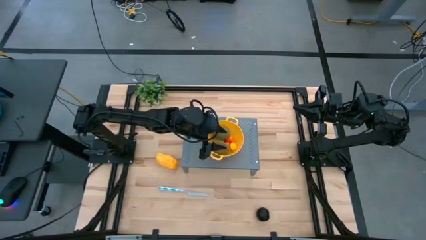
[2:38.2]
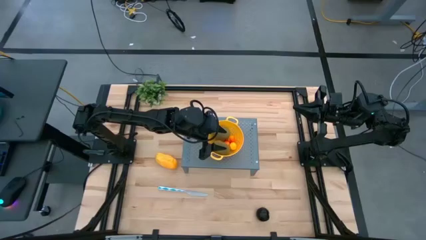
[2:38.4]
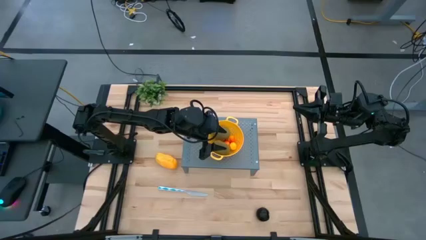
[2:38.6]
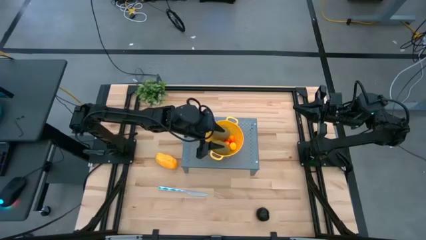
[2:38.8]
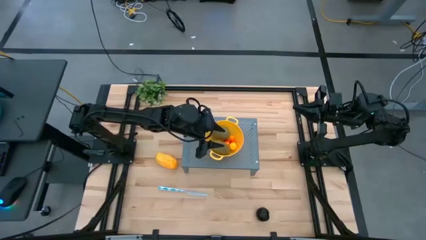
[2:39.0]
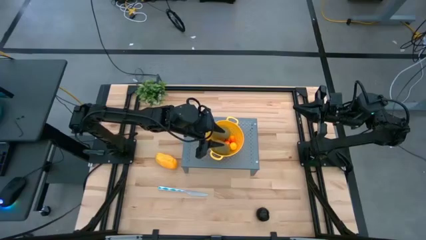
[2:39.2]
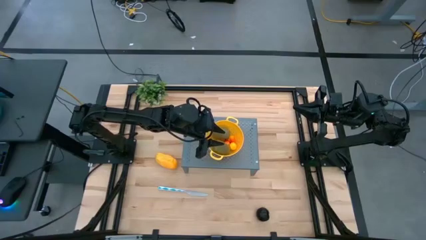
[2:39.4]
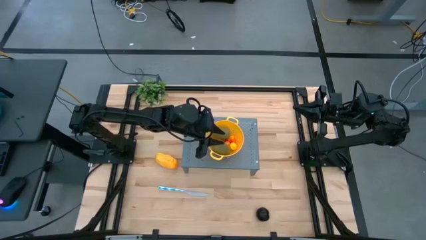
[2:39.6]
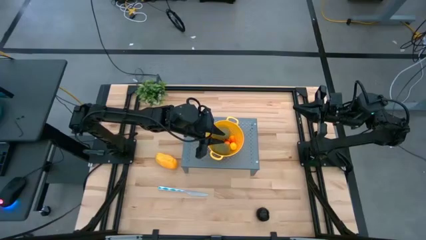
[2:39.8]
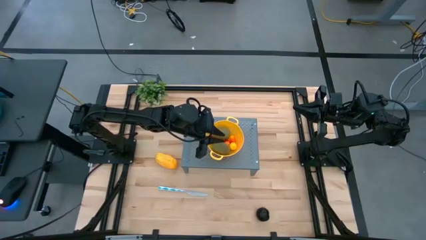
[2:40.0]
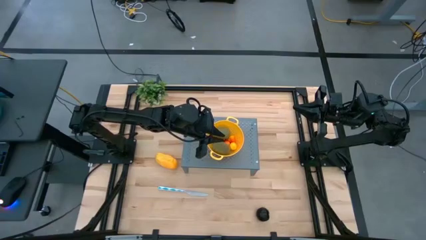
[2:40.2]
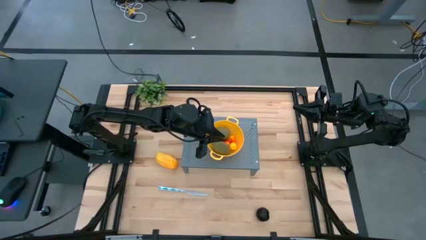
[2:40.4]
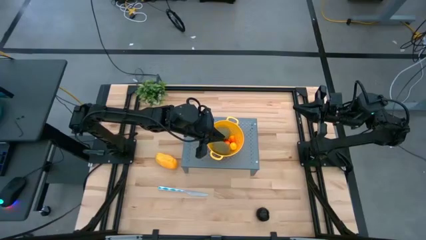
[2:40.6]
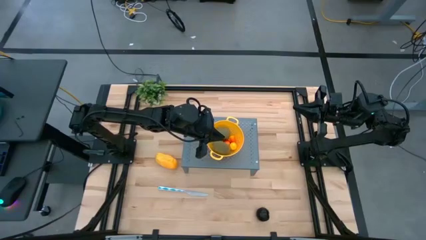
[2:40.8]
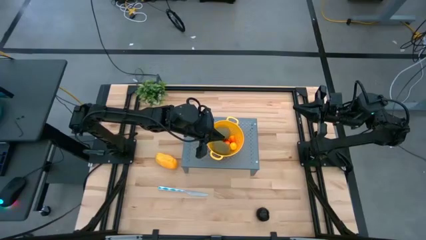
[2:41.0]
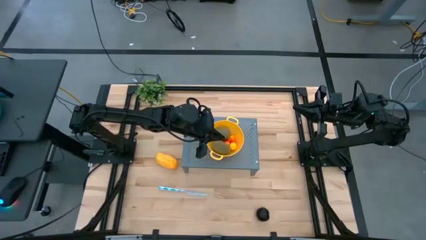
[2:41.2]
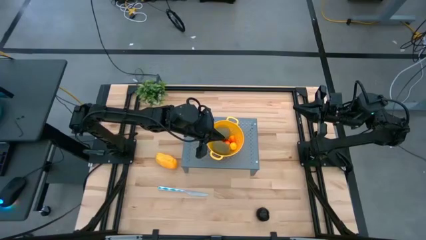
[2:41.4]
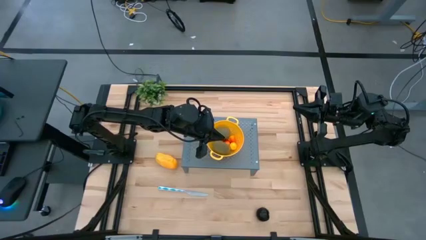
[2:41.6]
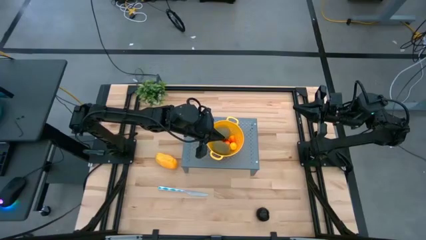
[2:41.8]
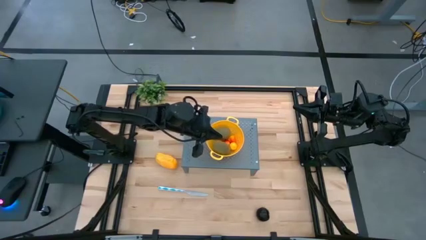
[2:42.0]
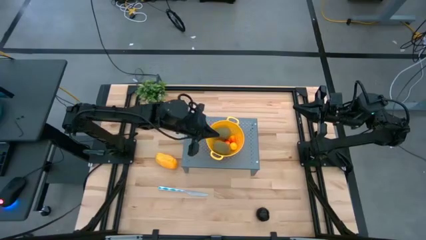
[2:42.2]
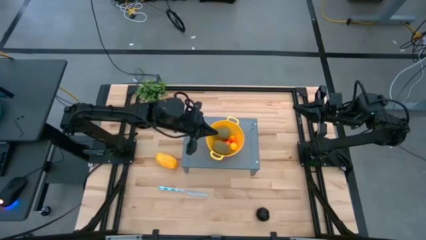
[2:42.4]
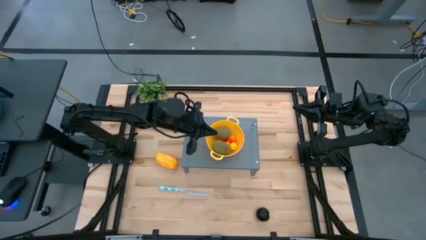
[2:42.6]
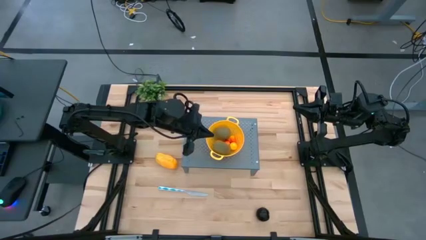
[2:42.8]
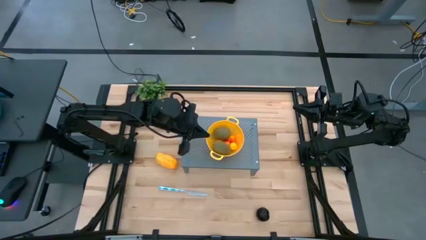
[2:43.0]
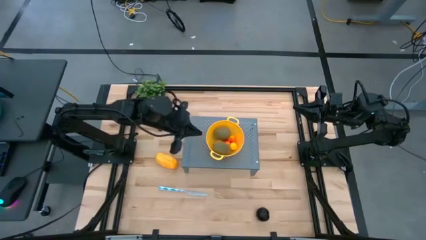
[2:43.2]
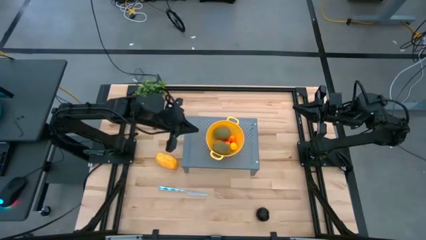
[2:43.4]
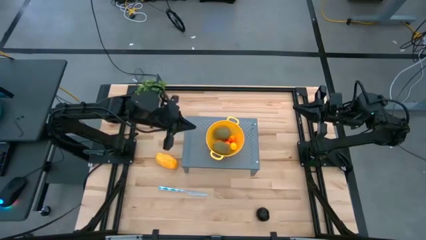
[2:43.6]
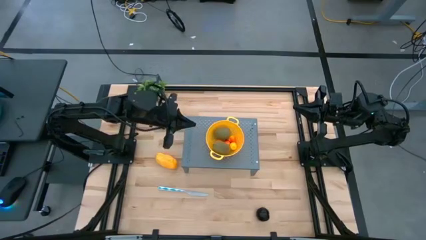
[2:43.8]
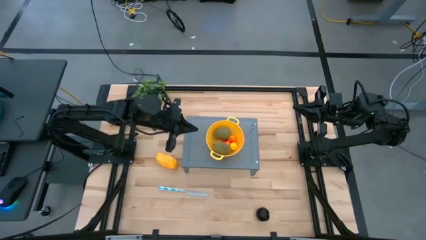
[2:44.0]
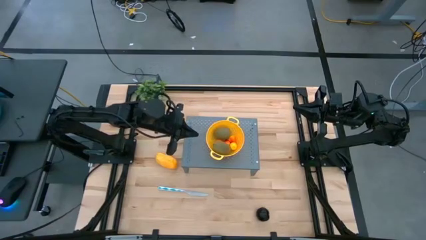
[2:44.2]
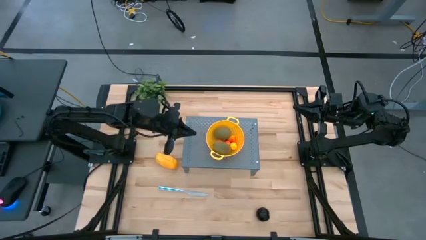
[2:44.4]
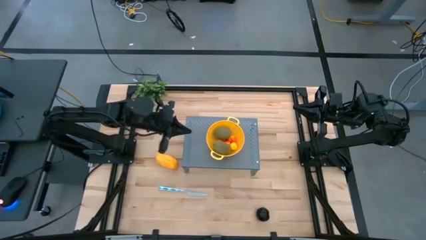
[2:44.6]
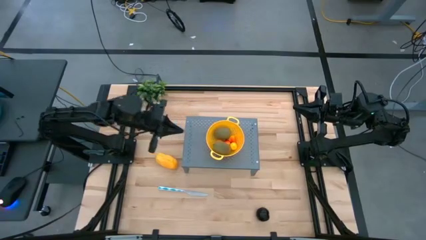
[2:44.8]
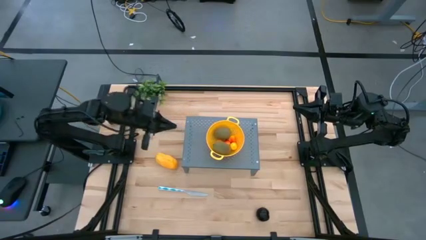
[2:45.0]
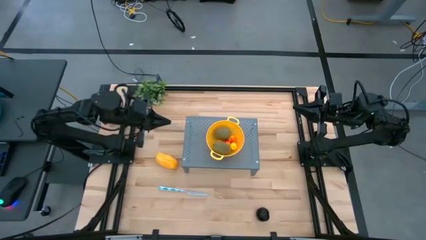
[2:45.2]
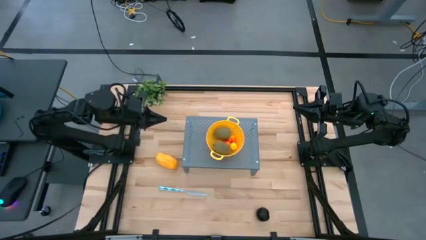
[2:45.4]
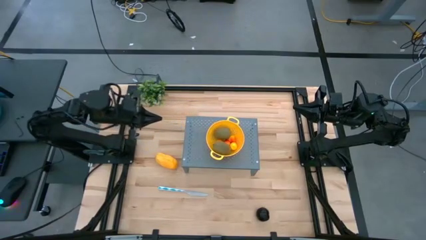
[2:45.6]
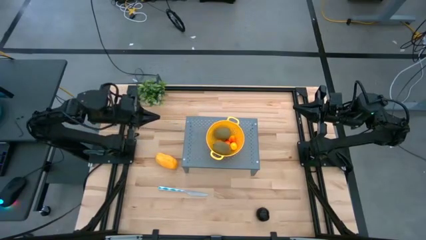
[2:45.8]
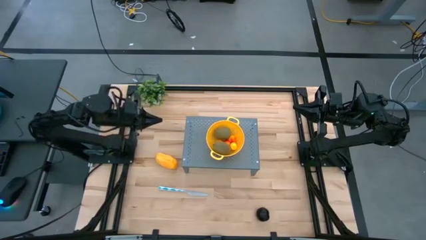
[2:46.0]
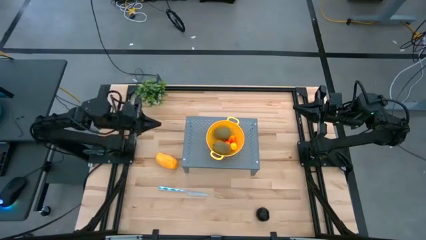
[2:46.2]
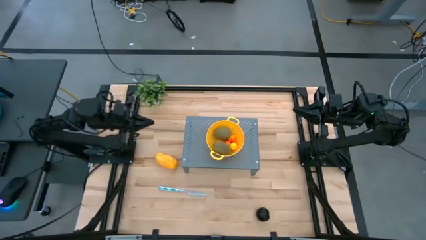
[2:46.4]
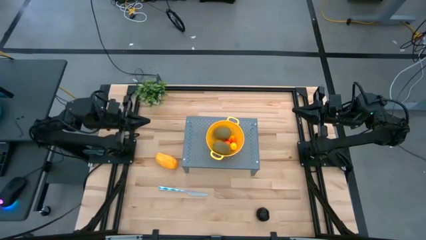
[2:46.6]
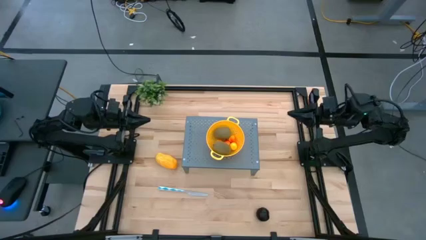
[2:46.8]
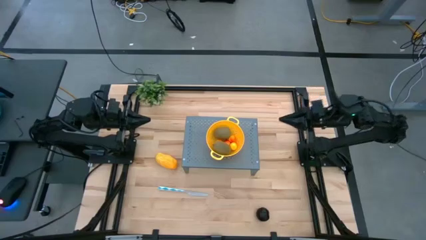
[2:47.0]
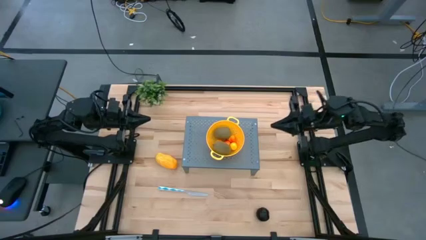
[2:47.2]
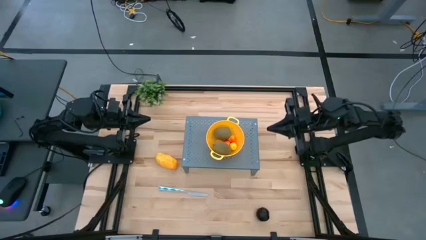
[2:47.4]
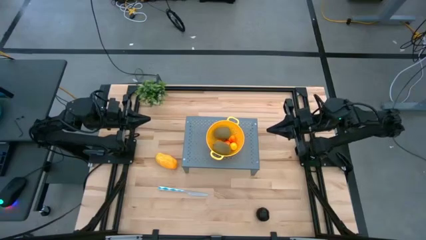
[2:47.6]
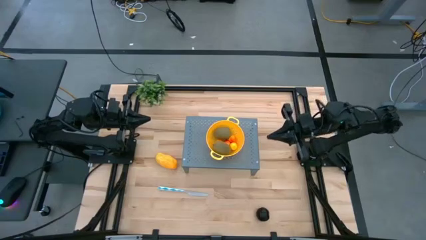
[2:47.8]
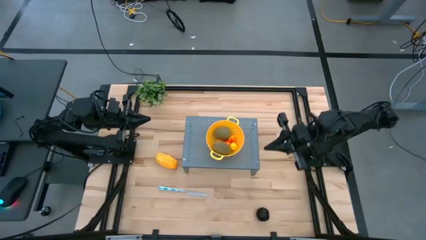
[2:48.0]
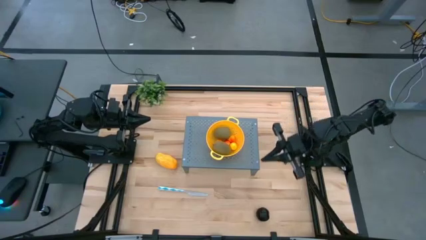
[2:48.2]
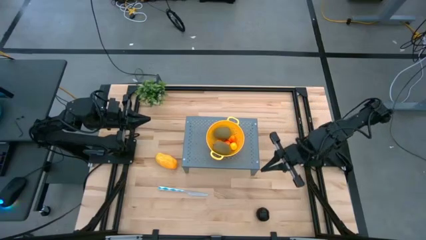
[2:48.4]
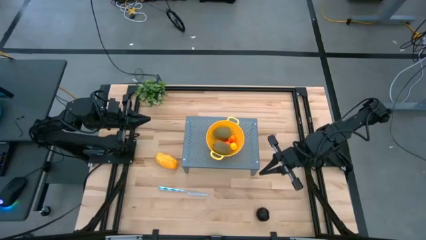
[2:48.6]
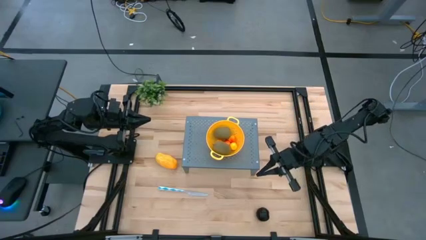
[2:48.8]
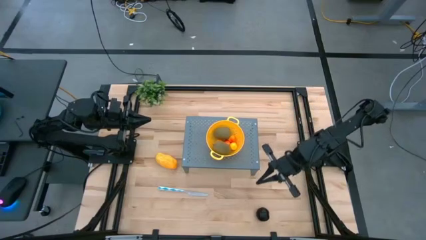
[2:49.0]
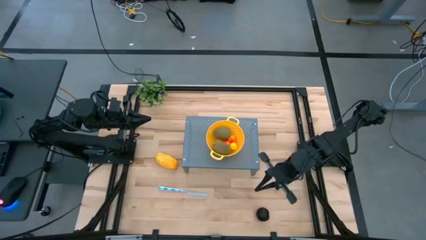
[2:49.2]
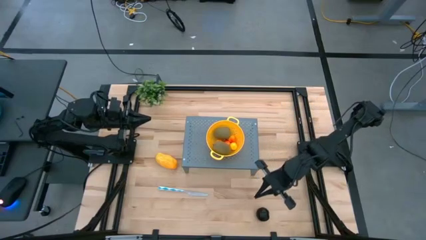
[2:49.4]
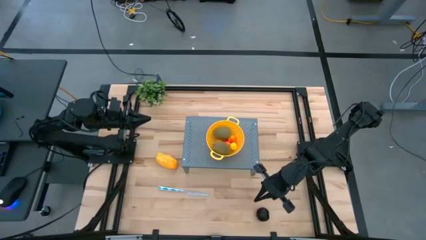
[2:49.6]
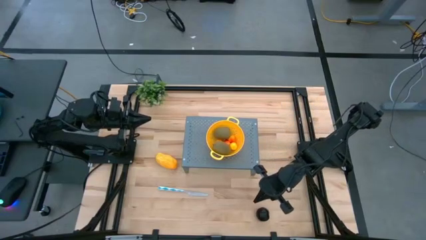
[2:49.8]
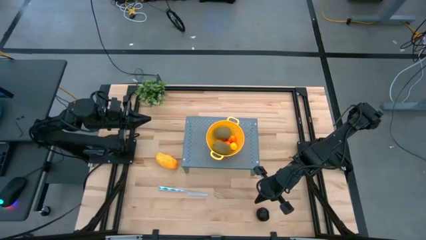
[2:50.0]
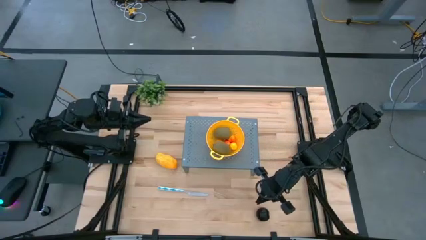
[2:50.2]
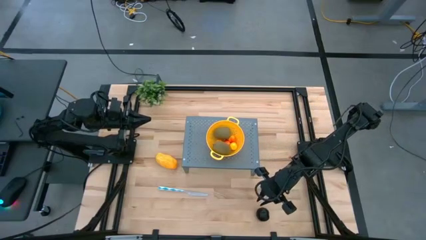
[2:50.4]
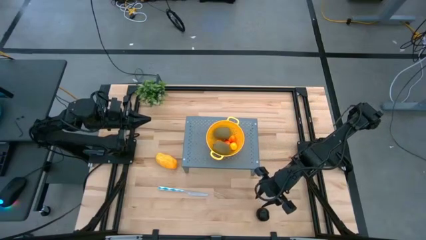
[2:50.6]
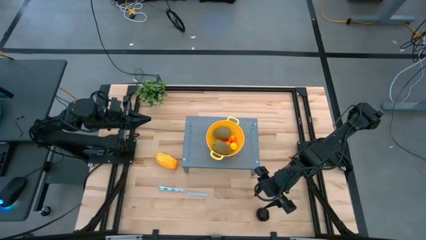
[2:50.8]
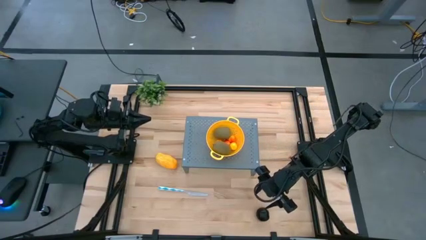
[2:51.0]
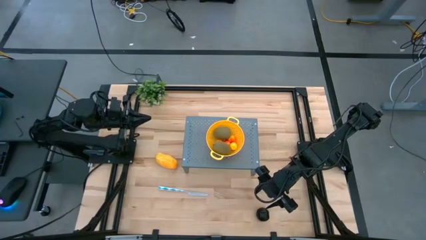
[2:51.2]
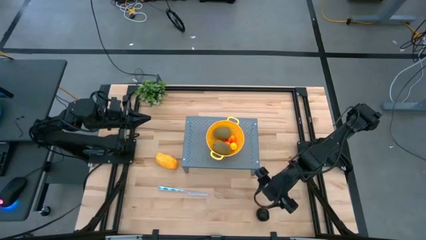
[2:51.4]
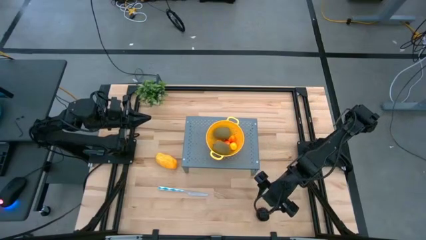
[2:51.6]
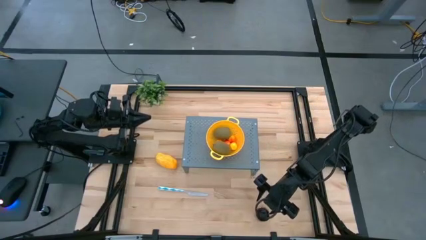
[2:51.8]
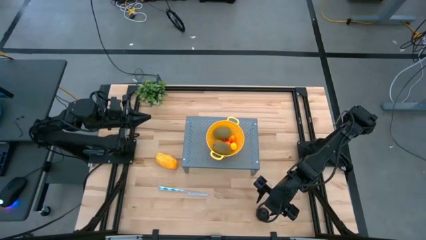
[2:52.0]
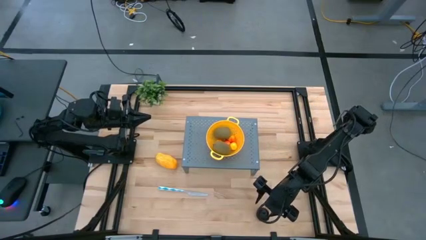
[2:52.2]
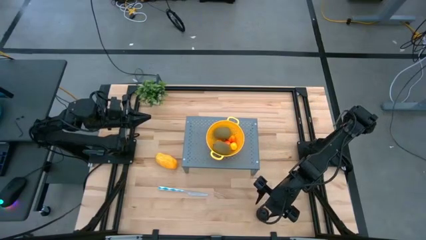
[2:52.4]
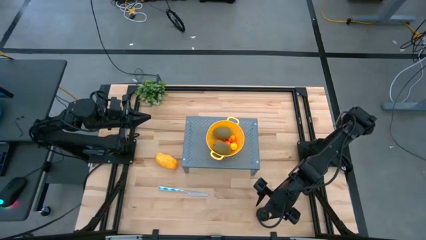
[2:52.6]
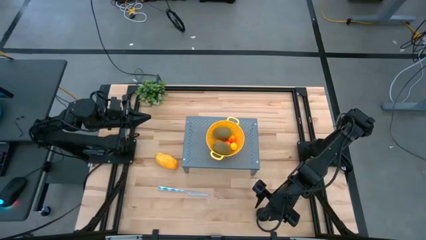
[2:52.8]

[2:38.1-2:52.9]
Task: Pick & Place Fruit
Put the plum into the strainer bowl on the shelf

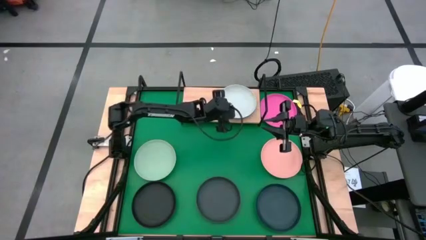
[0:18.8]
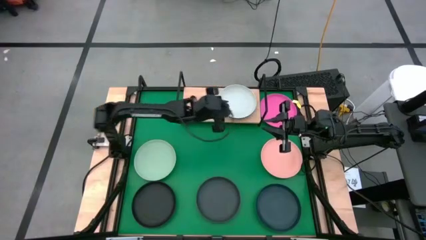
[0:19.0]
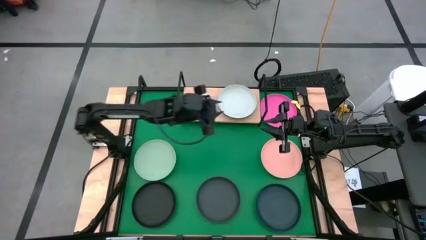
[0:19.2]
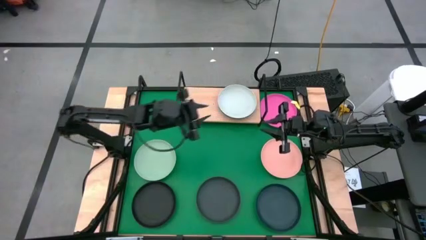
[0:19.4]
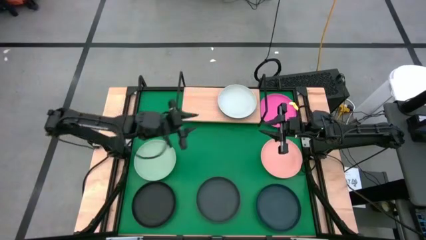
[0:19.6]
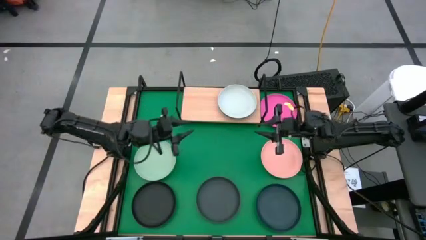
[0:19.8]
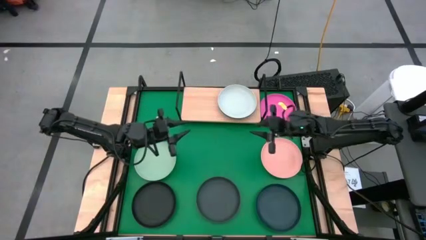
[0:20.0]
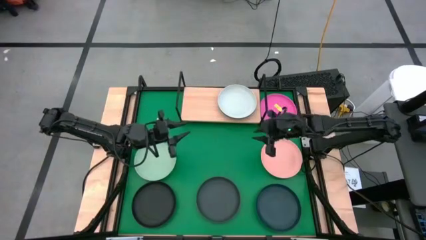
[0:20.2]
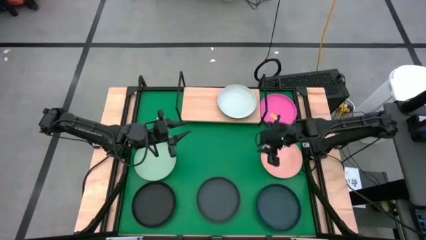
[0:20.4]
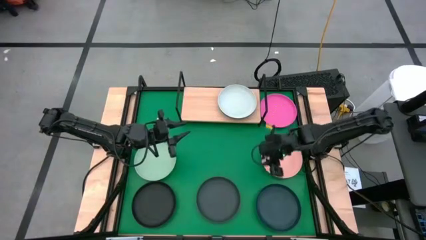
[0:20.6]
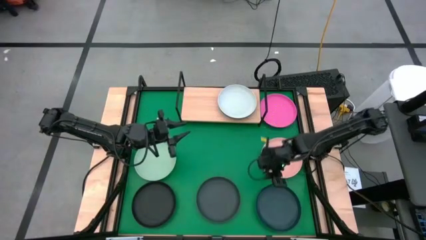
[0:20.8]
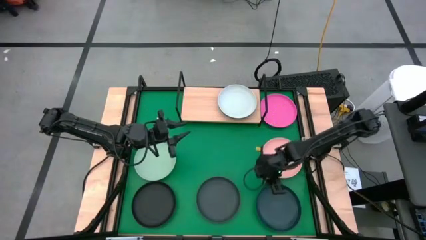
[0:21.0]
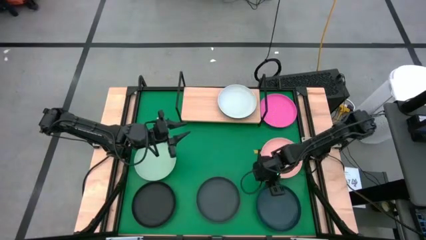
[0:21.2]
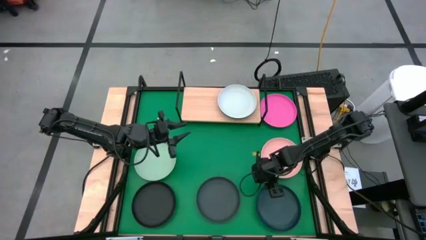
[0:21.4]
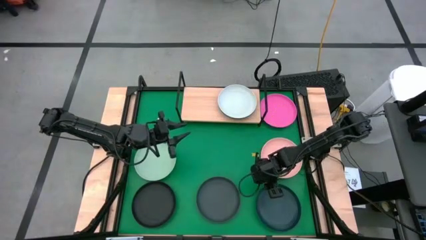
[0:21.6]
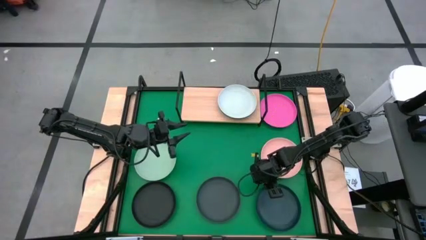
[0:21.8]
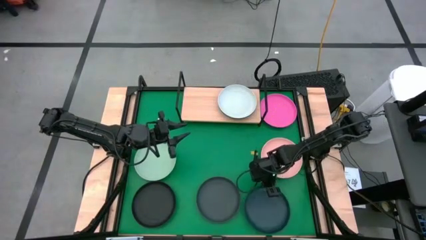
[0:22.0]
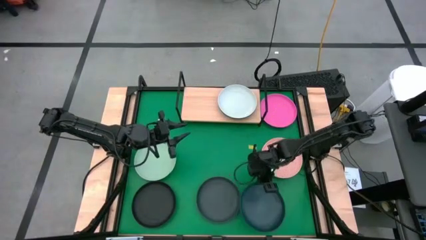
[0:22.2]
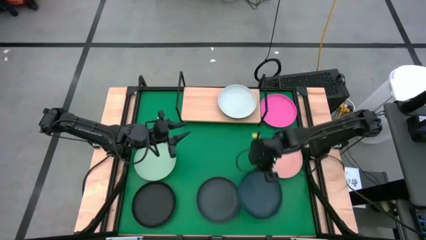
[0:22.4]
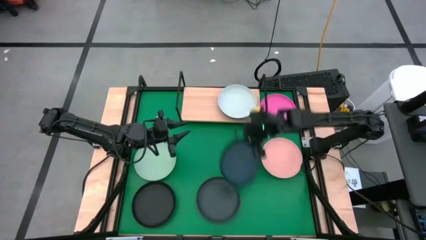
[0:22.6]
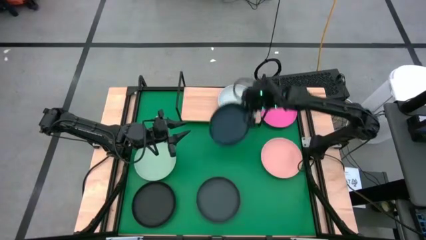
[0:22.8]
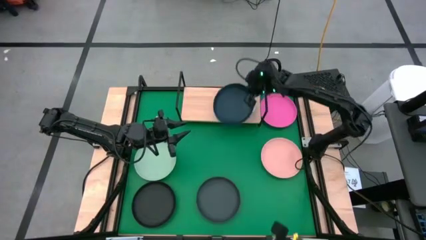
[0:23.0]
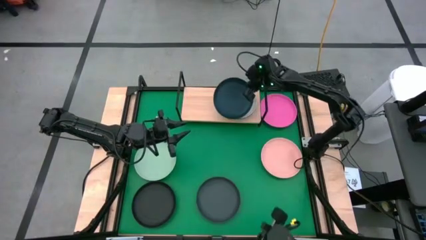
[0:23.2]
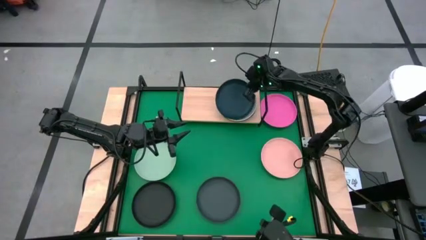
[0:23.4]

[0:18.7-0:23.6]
Task: Place and stack plates onto a shelf
Stack the blue plate on top of the white plate on the shelf
